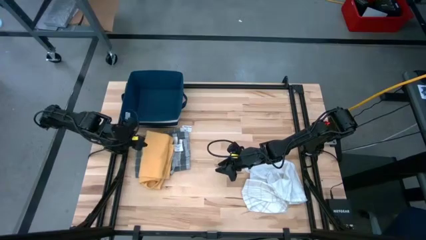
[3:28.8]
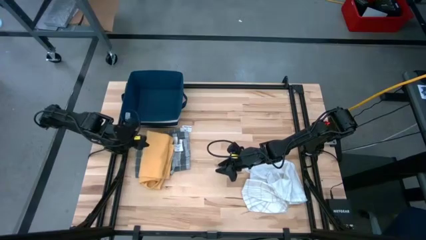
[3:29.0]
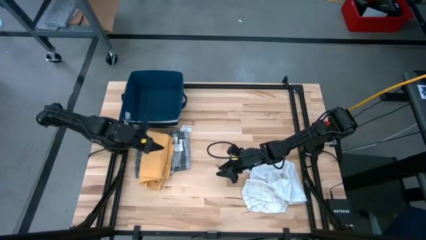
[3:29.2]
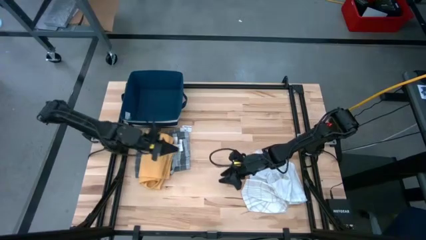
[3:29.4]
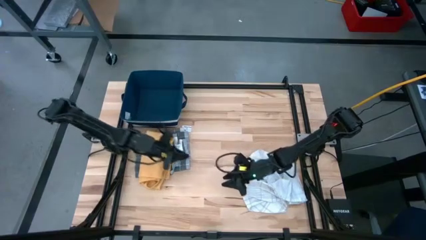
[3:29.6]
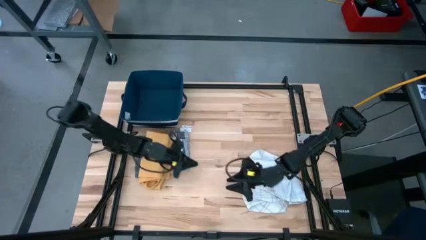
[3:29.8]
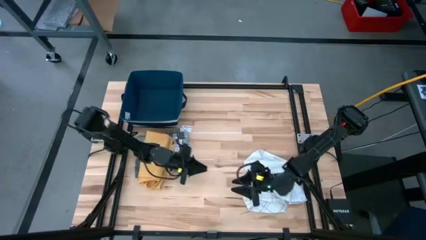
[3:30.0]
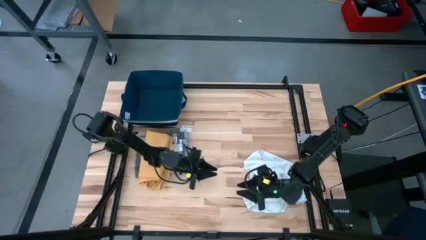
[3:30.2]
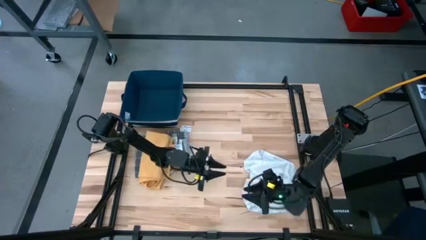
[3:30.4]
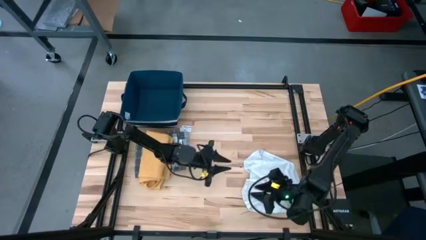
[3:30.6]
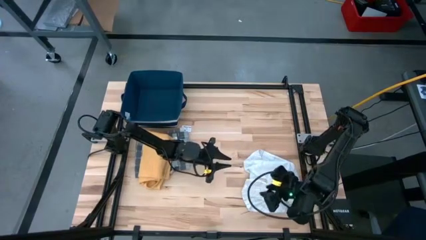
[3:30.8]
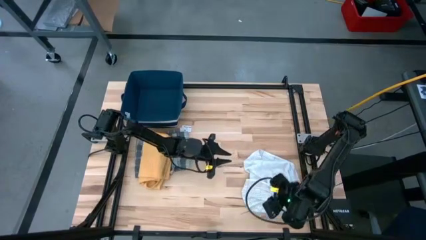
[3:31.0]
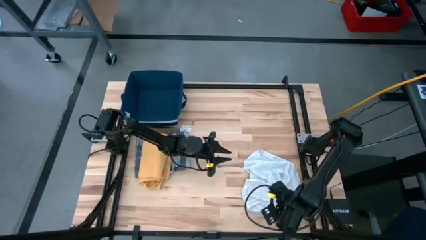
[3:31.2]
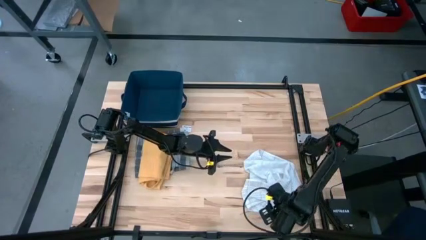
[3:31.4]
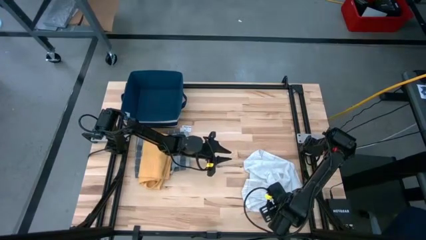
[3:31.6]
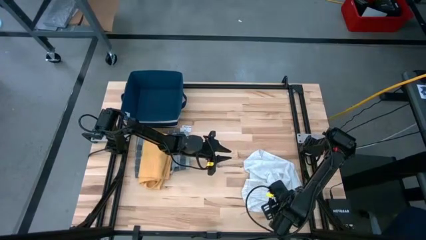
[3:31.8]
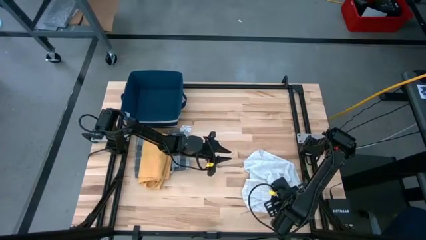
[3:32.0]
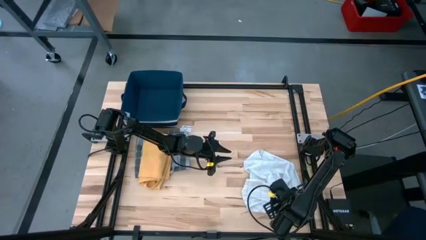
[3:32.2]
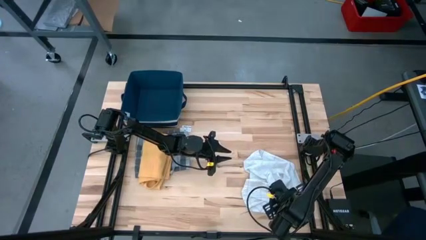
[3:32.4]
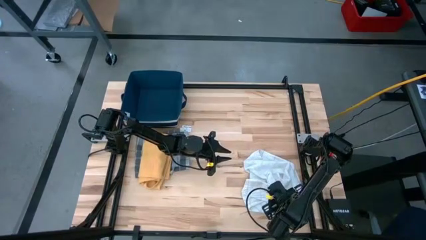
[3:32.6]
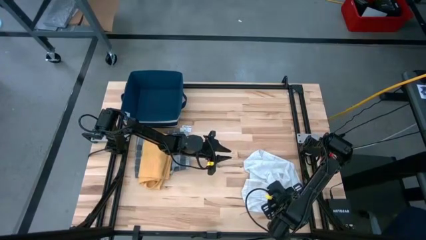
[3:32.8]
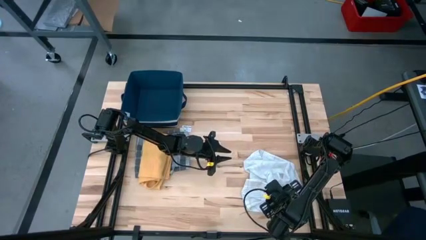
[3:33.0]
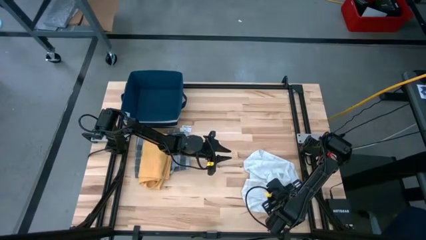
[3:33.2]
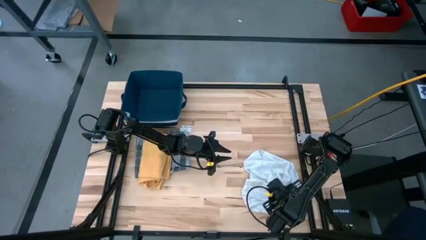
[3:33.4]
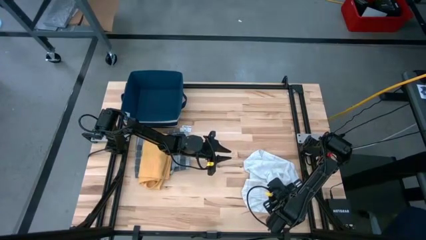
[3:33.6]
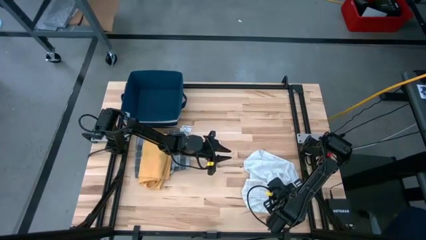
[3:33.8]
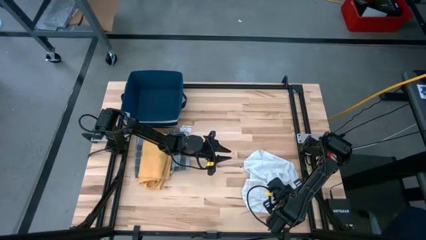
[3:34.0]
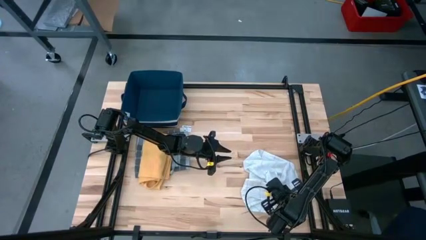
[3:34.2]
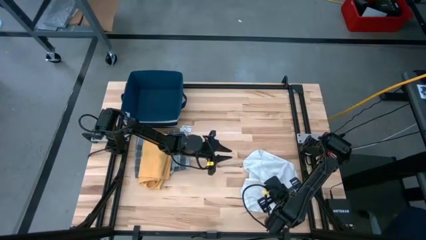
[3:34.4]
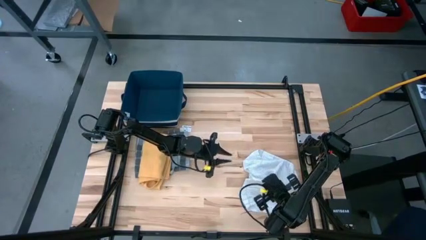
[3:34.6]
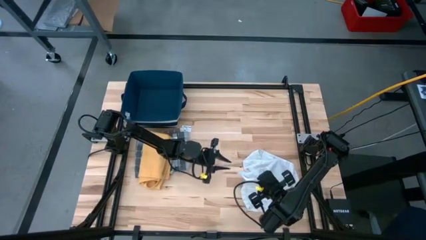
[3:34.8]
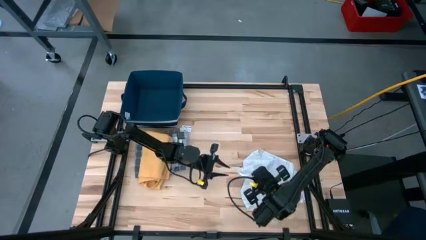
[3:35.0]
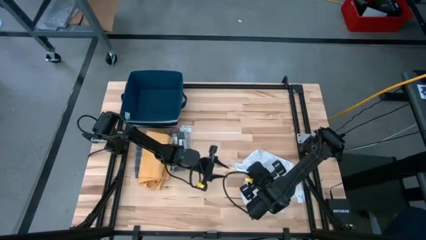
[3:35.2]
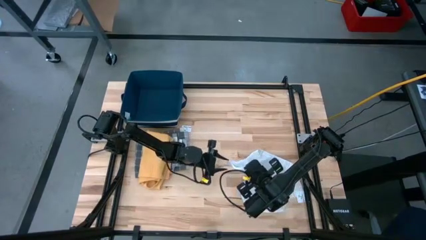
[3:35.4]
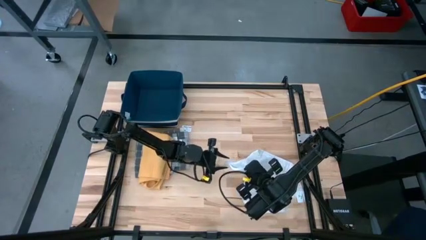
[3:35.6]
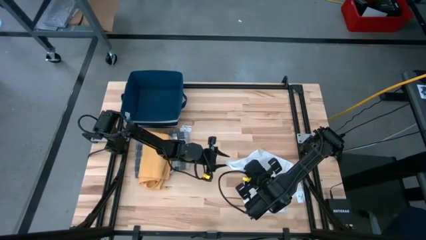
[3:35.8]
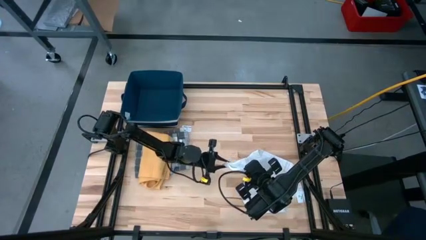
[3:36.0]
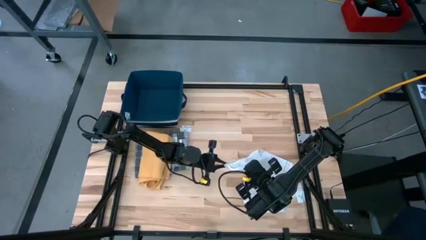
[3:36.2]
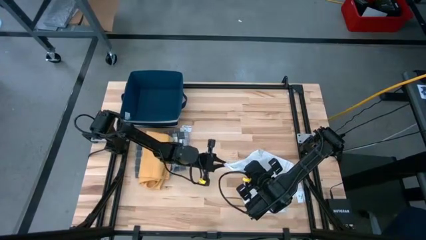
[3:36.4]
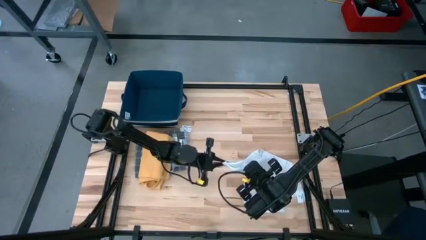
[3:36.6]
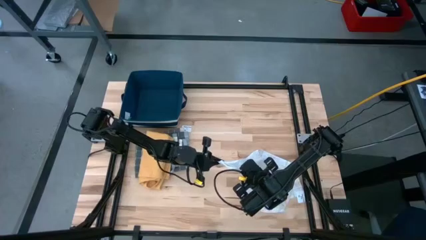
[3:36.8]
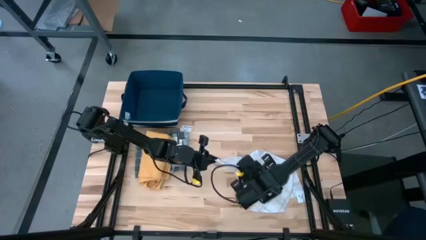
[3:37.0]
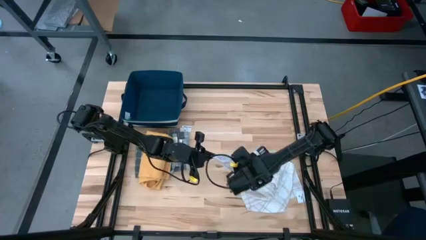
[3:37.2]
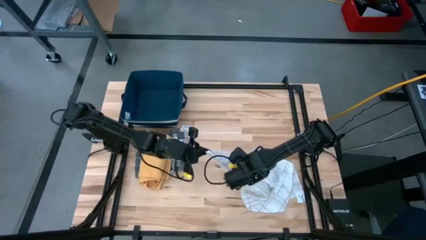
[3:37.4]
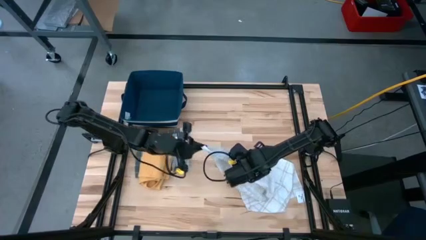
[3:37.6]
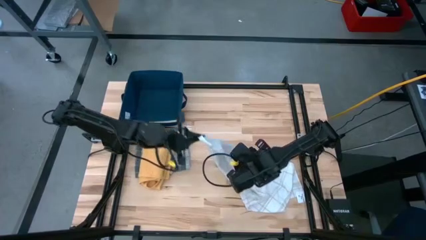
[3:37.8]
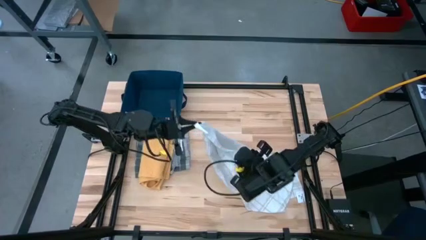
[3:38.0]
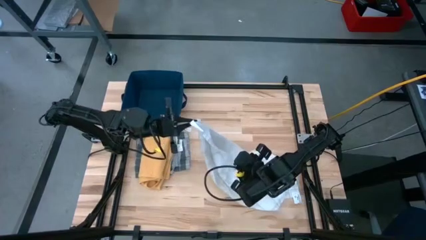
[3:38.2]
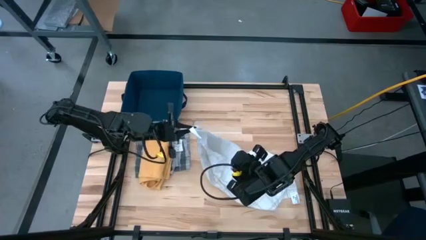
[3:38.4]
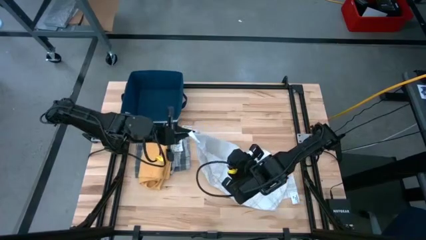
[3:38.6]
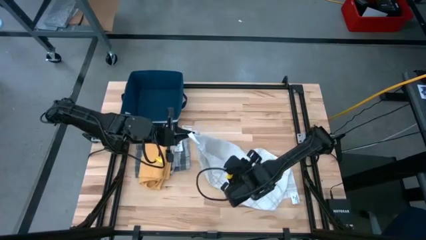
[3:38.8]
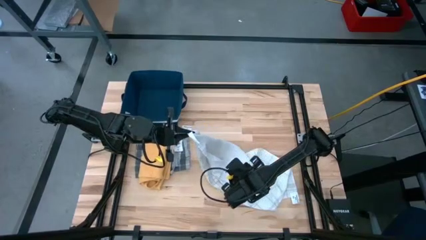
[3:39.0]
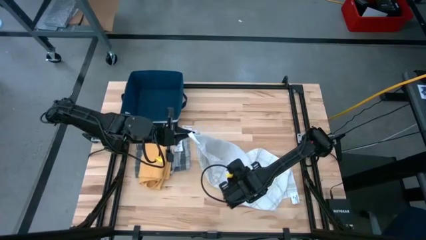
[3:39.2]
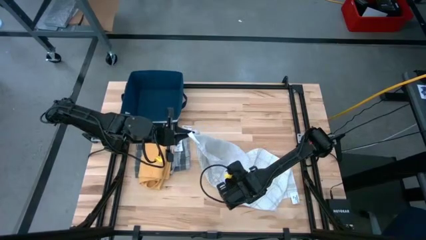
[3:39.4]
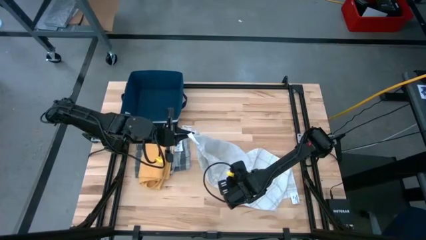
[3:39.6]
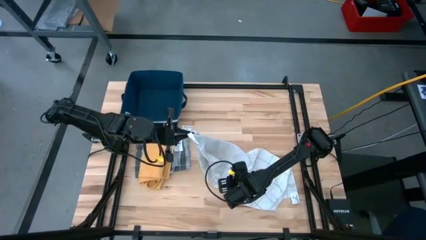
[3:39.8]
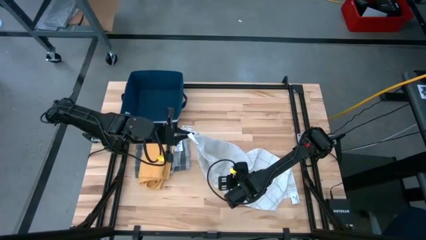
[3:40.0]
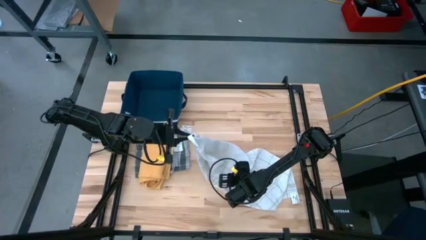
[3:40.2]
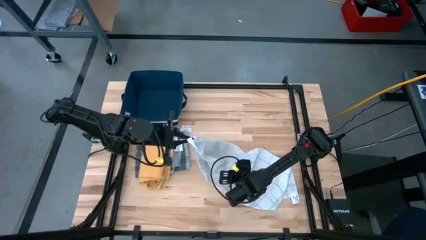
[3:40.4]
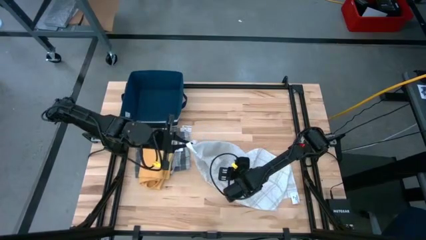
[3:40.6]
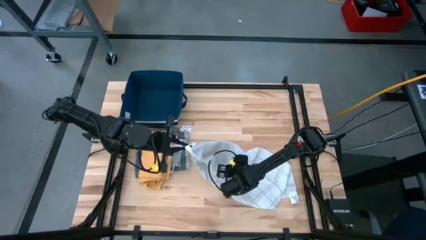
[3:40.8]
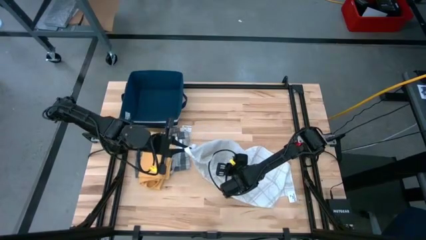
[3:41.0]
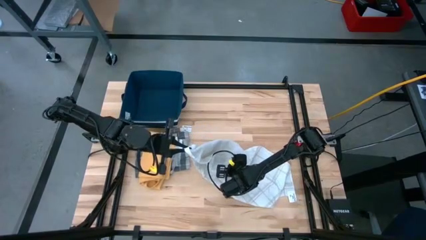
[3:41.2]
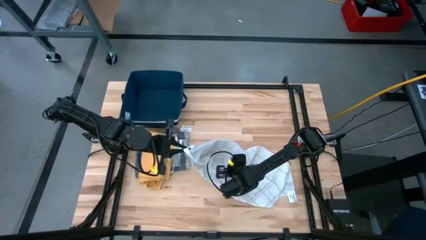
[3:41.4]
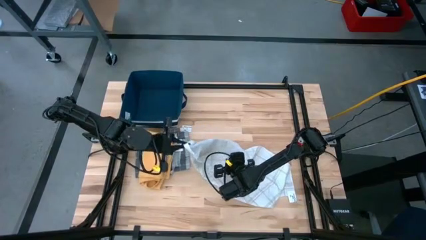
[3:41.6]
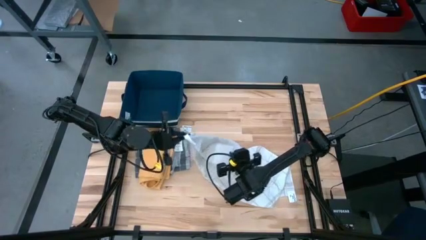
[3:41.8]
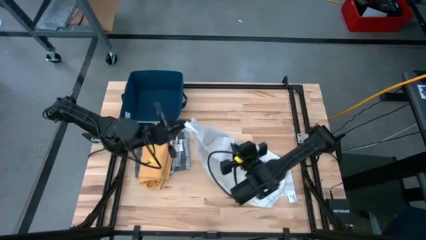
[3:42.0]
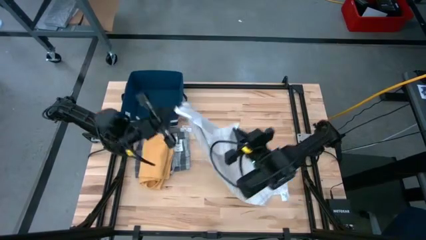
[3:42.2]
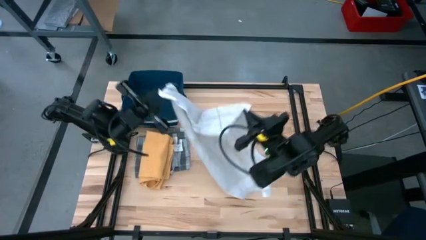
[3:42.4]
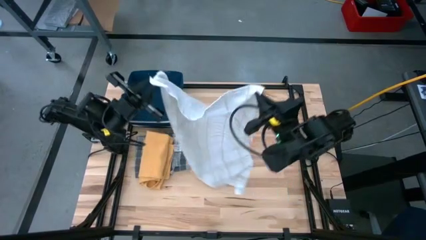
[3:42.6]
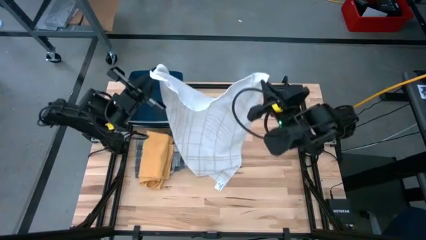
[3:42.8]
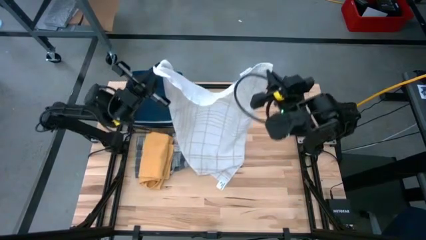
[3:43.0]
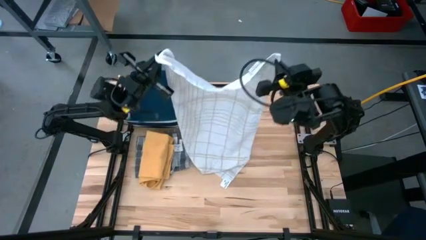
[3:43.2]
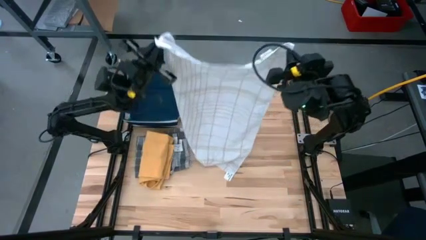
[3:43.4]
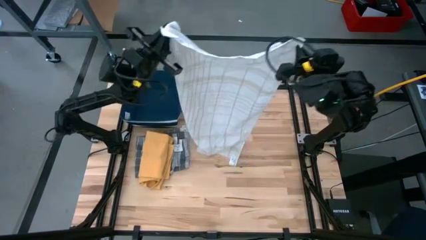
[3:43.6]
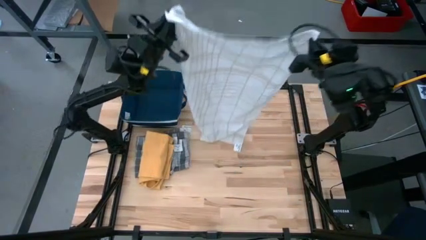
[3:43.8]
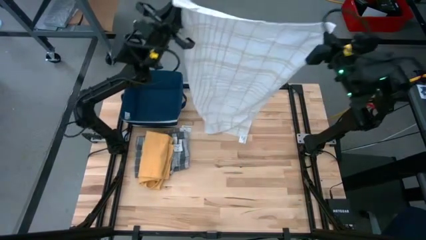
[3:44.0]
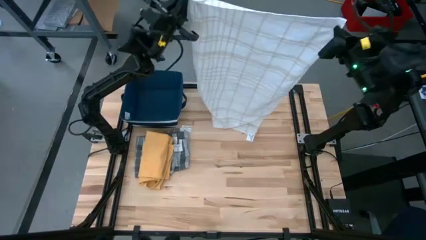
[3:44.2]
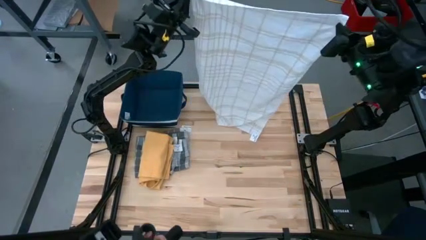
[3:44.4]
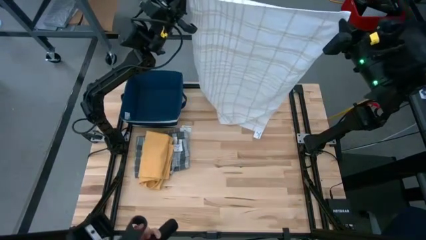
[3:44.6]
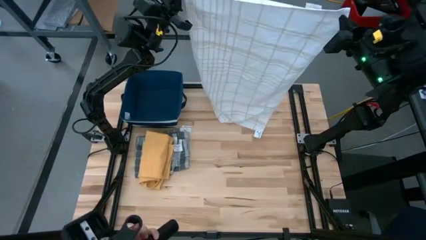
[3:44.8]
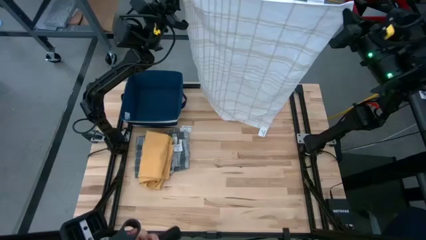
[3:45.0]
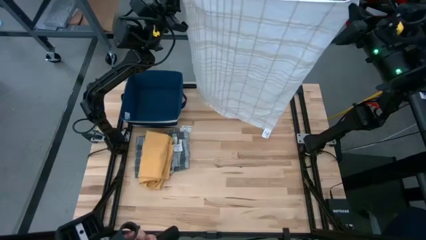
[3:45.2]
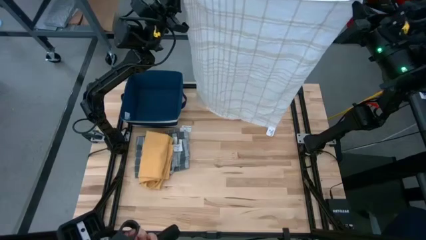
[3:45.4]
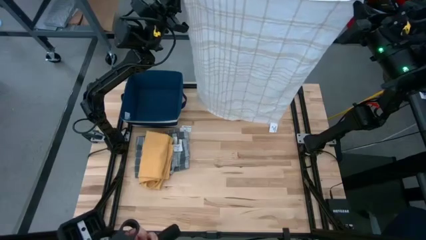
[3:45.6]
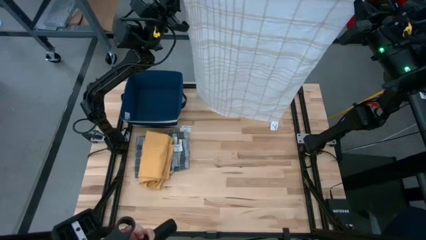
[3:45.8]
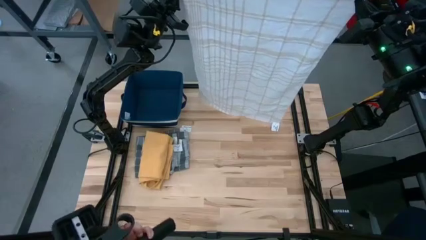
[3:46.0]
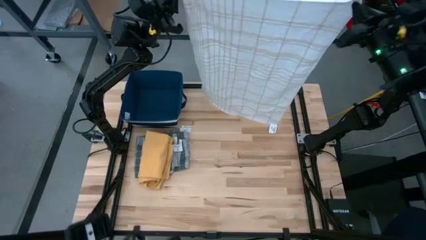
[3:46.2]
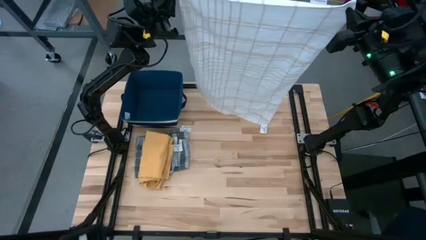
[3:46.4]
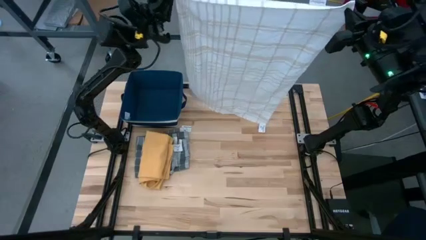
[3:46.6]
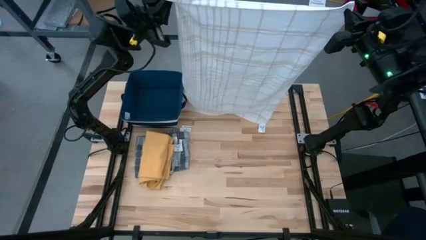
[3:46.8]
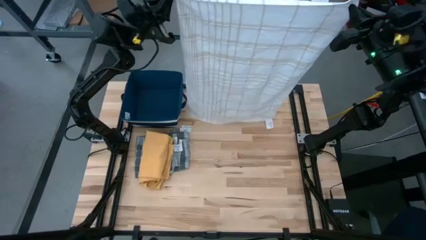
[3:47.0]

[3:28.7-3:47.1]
Task: Fold towel
Fold the white towel
